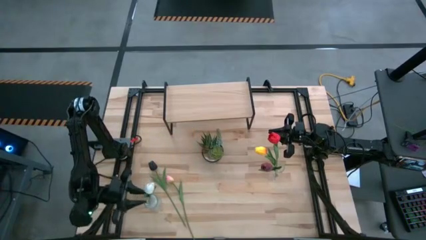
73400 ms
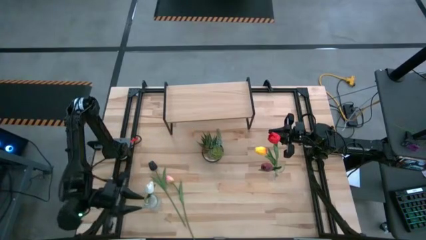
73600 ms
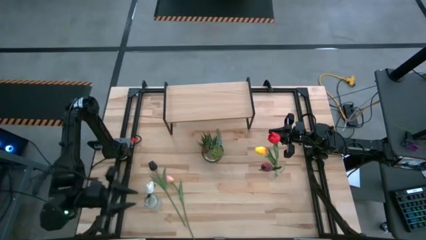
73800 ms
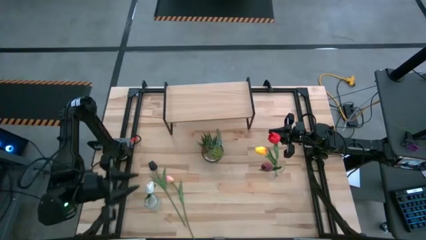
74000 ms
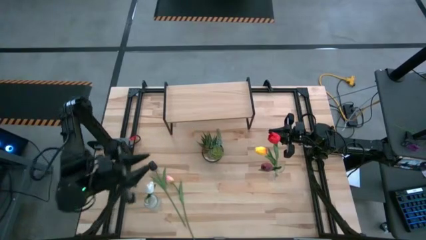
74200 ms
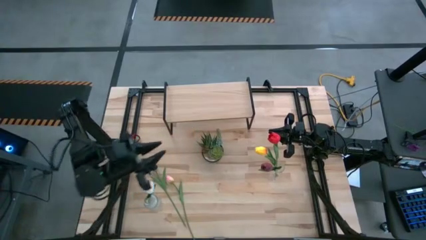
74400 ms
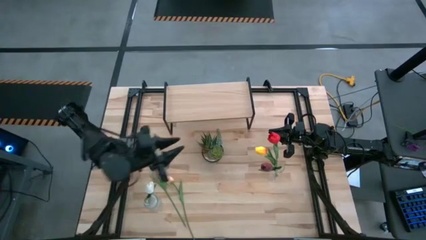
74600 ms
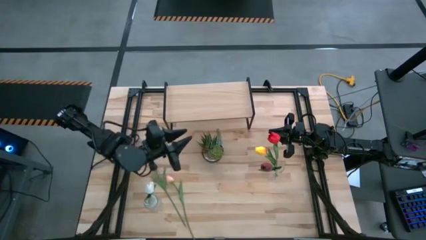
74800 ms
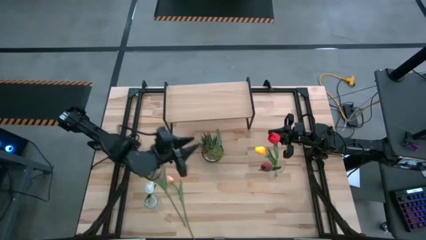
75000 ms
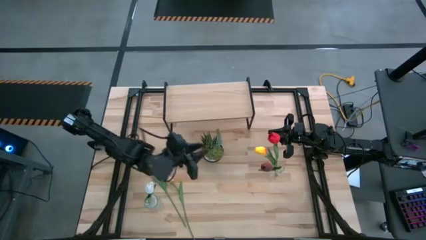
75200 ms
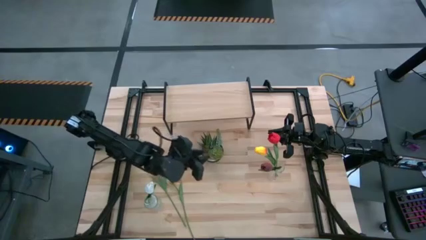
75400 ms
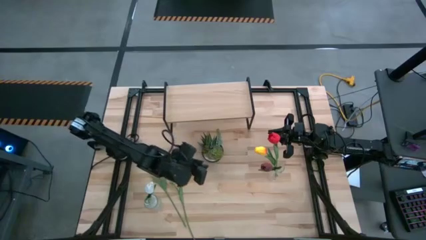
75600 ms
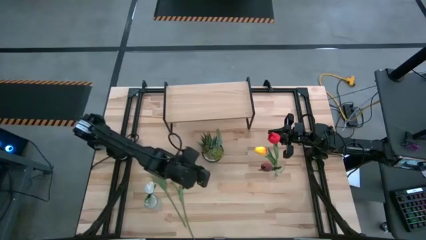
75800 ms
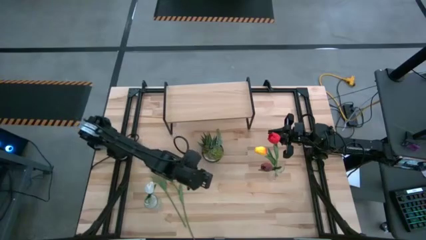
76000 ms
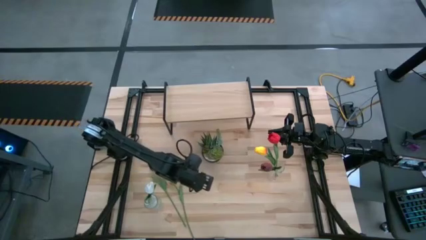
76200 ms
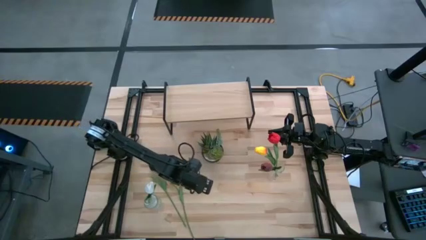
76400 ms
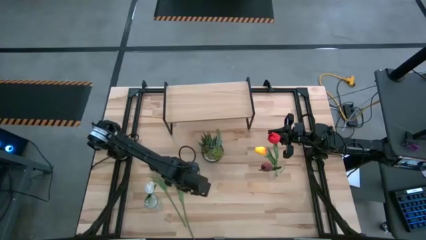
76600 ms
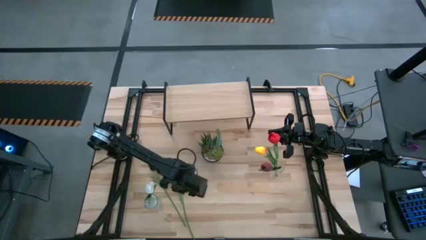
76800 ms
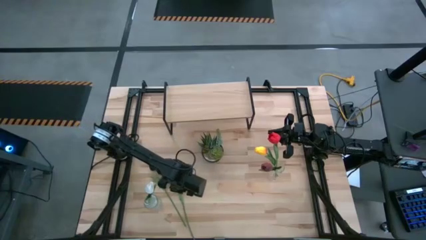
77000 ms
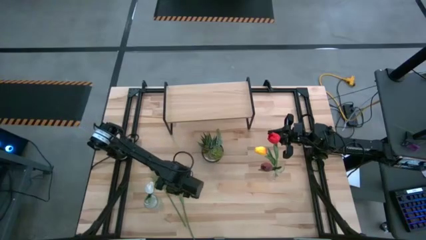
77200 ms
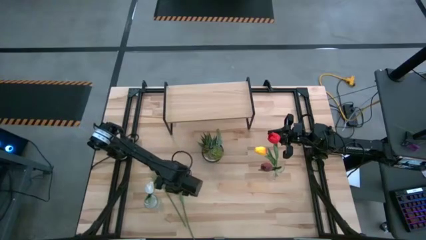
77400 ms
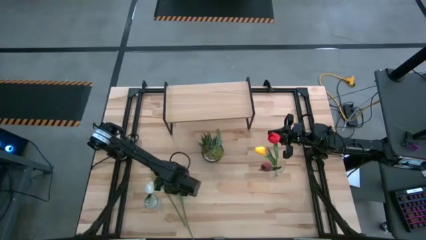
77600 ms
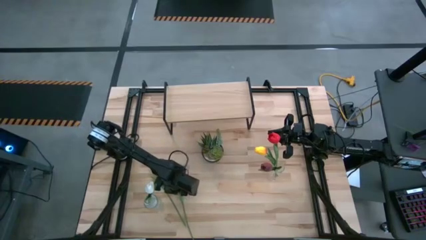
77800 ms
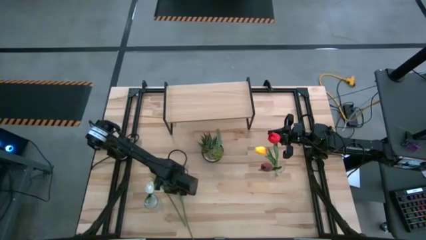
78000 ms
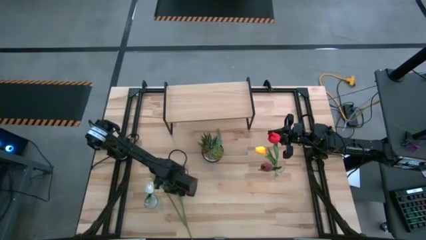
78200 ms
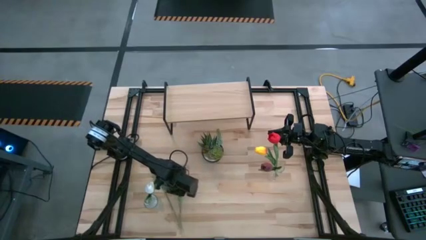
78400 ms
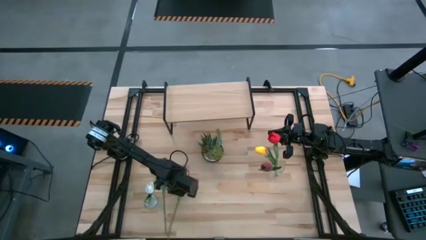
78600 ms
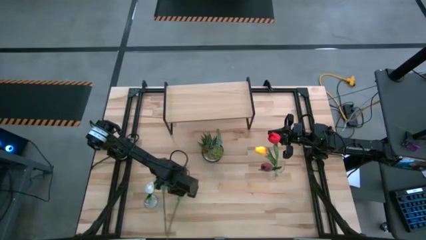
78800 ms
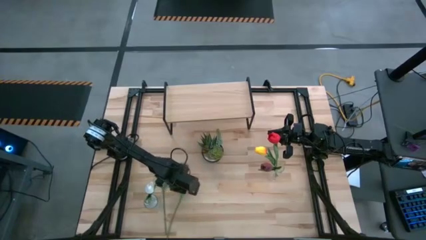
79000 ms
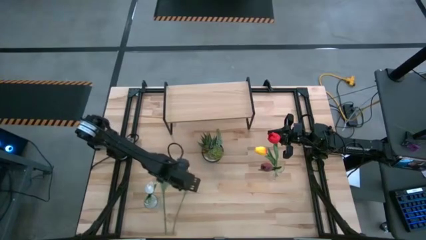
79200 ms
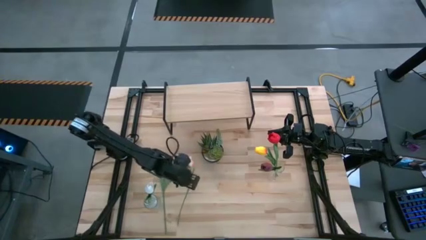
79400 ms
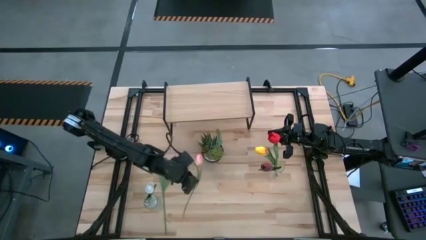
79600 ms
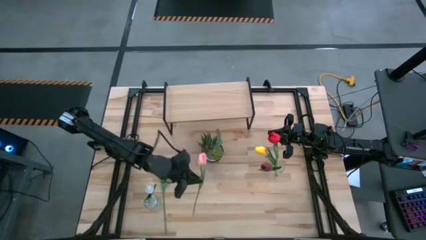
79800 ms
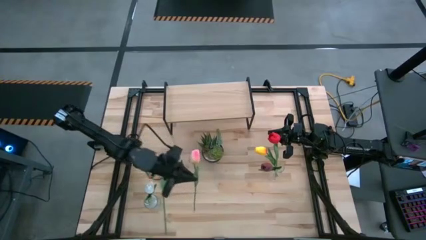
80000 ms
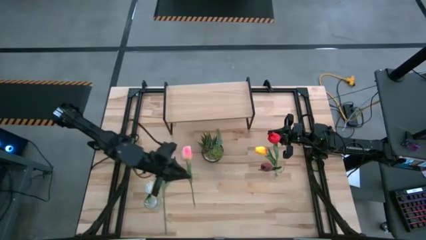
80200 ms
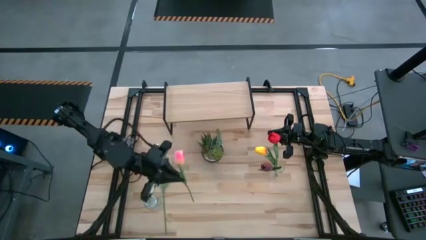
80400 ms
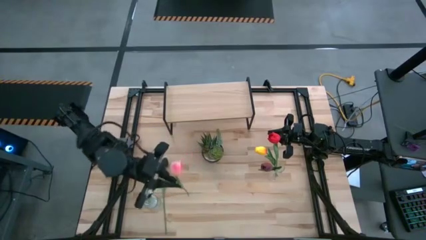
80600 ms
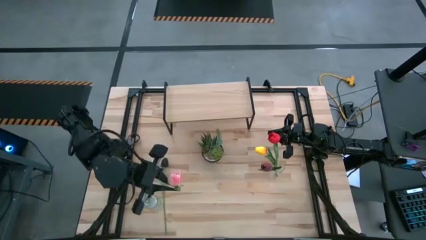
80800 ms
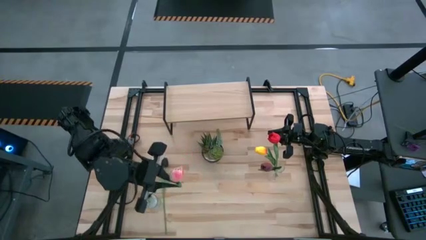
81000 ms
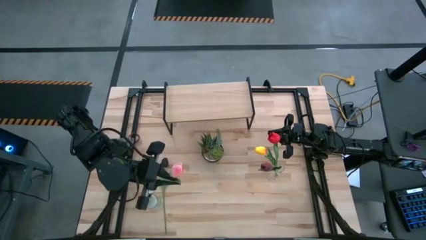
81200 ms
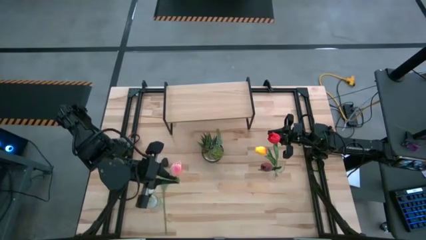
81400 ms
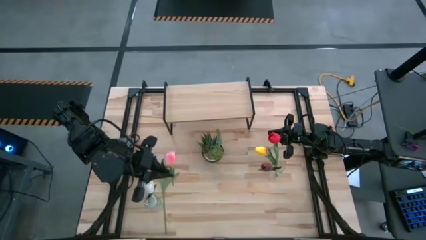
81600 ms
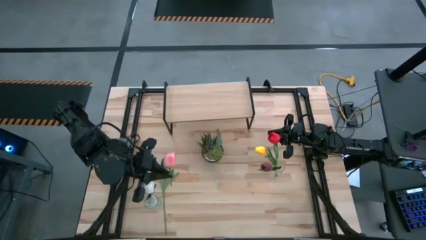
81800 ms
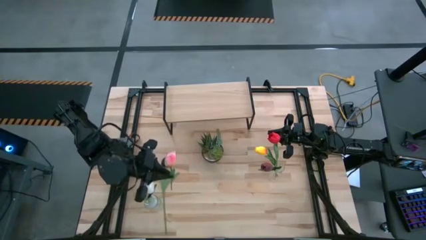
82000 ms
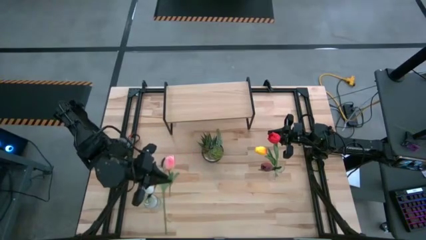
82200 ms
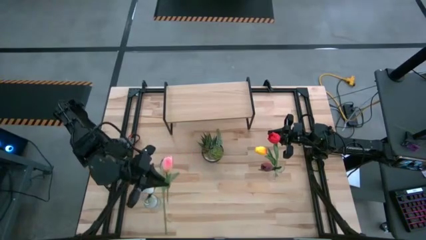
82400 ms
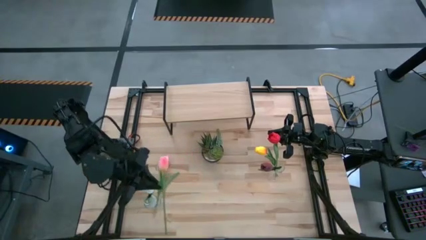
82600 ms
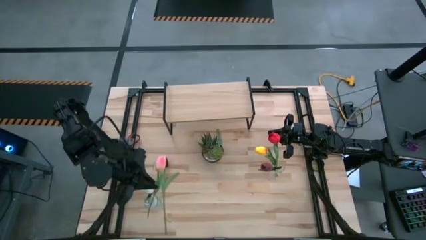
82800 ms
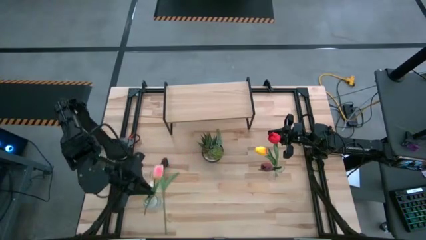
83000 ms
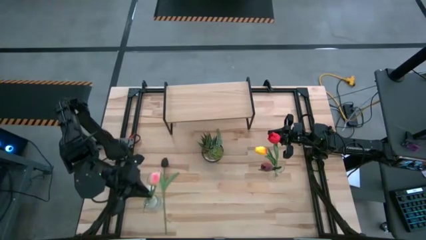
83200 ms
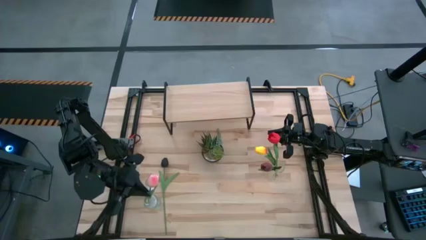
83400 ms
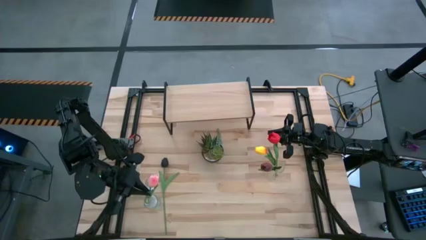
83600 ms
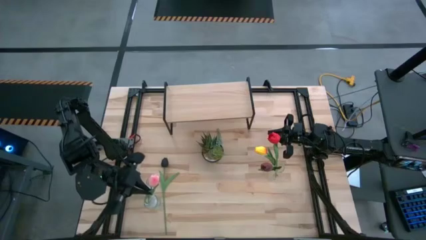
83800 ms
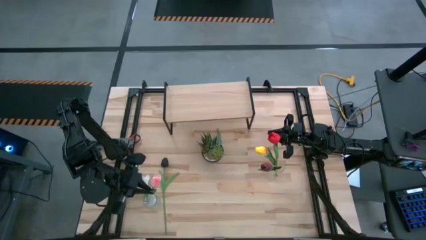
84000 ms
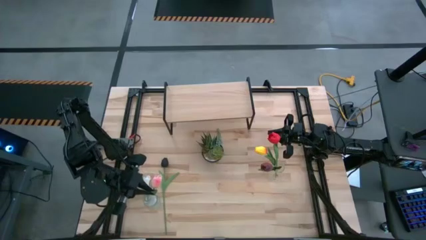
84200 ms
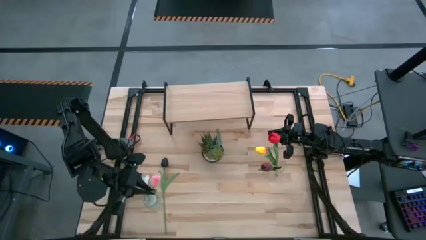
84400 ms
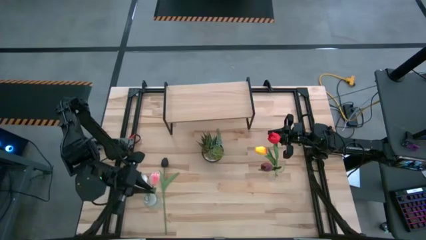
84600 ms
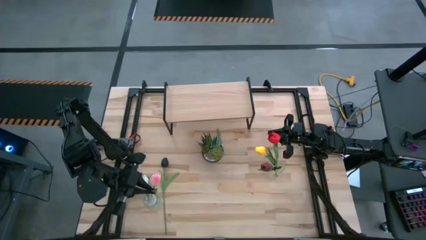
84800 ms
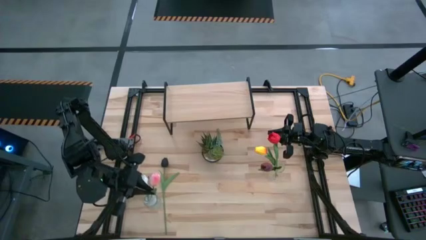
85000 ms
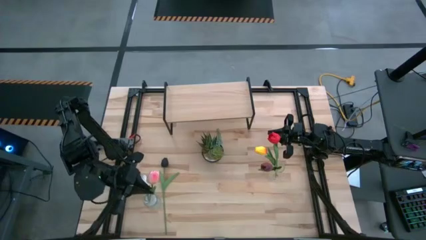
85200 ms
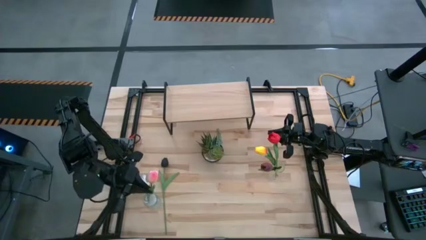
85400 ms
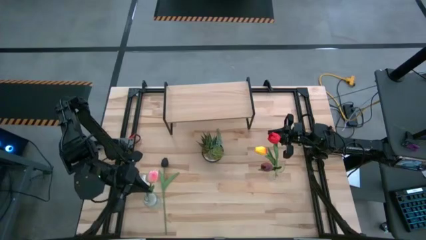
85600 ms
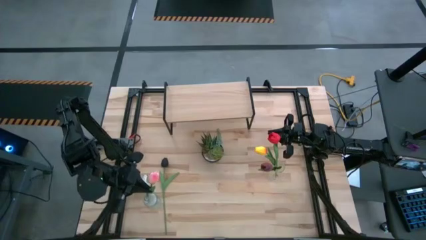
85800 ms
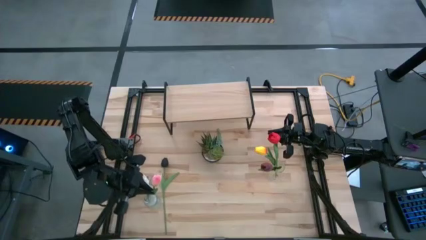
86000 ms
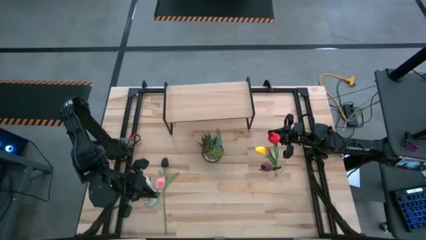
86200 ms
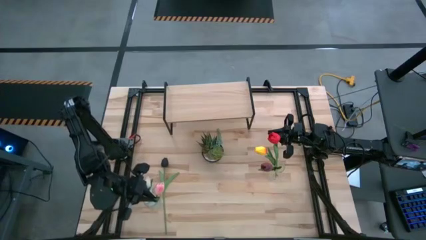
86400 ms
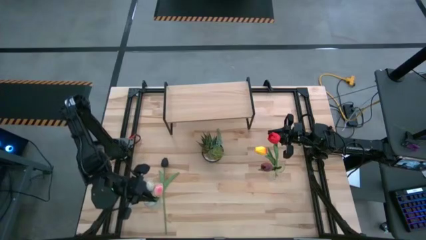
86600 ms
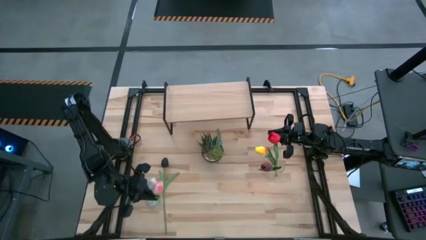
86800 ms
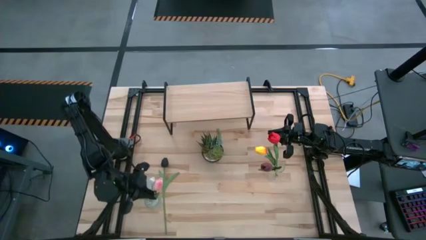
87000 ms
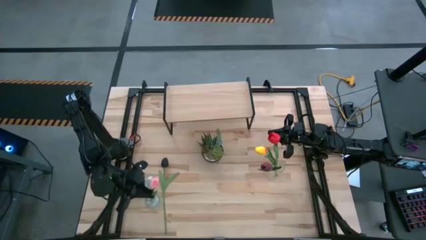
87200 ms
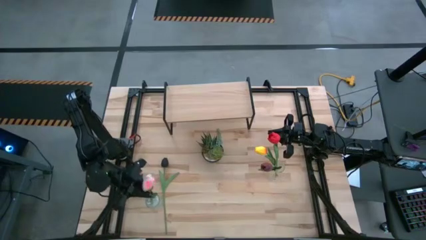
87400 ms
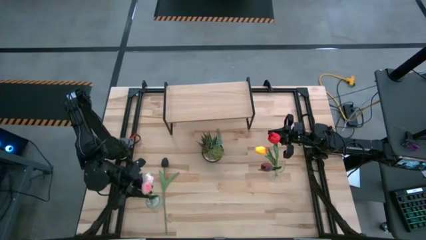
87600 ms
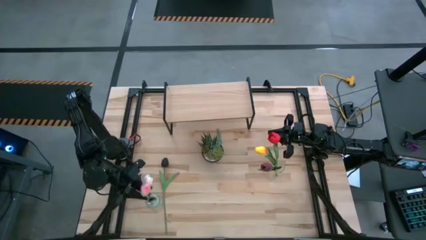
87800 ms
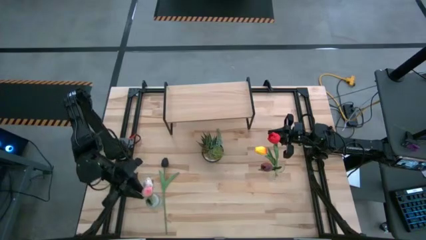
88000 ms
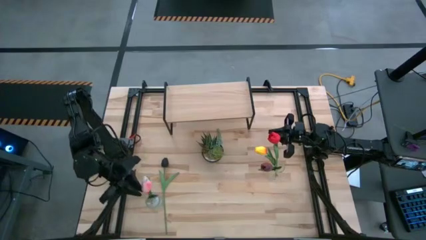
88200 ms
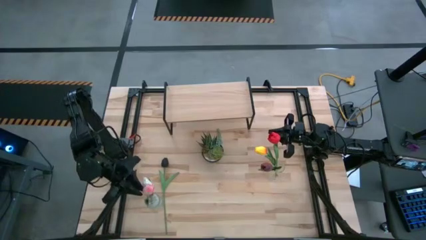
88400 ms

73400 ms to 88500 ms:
Task: Pick and place flowers into a vace then onto a shelf
Put the pink flower into the left transparent vase
